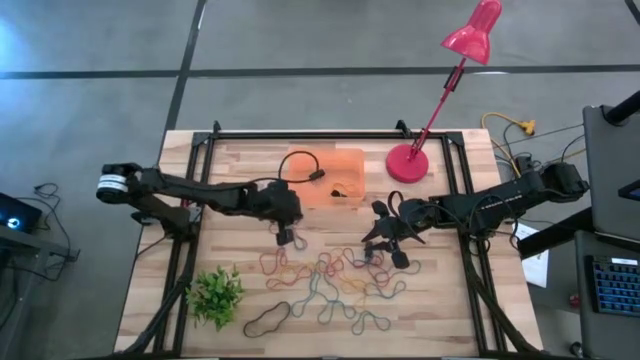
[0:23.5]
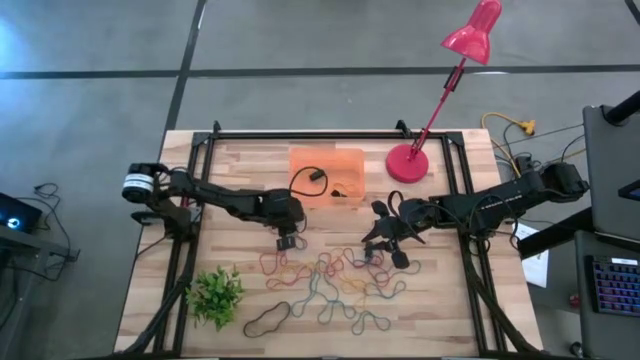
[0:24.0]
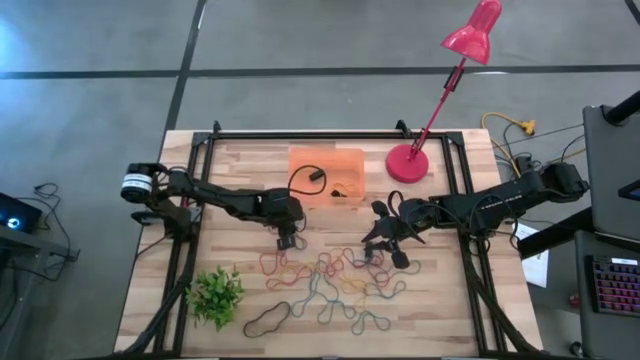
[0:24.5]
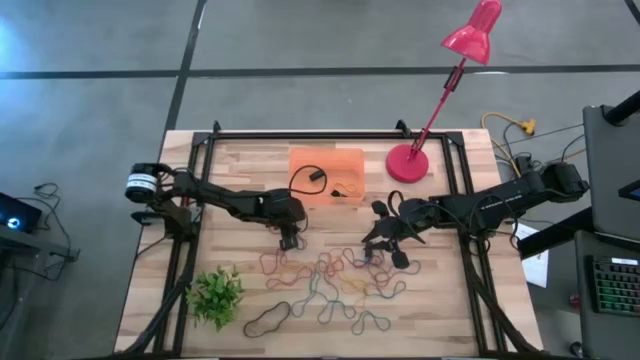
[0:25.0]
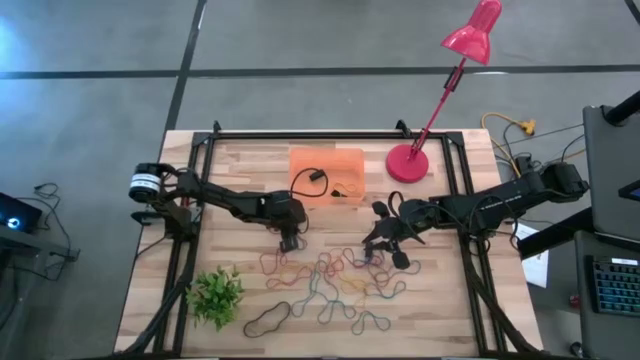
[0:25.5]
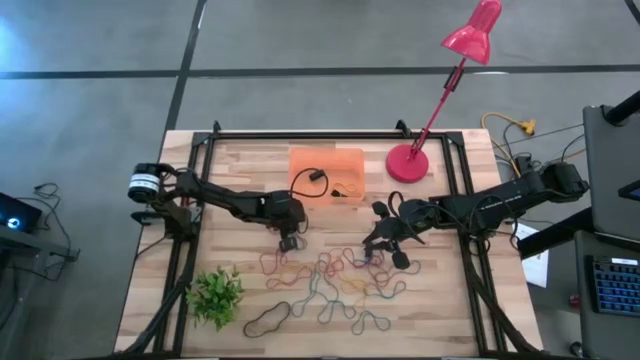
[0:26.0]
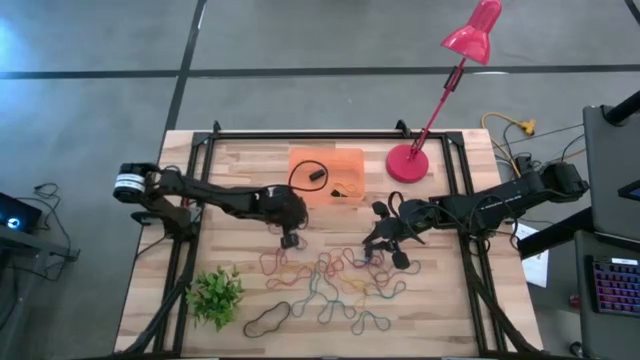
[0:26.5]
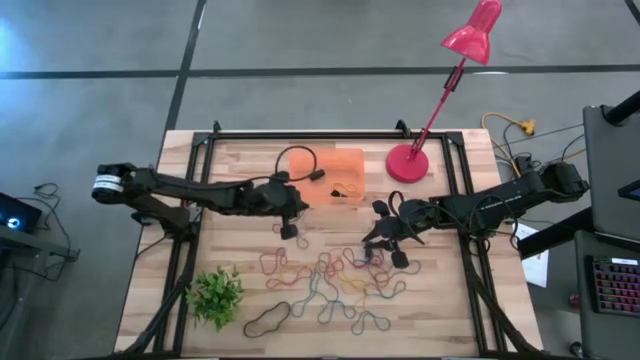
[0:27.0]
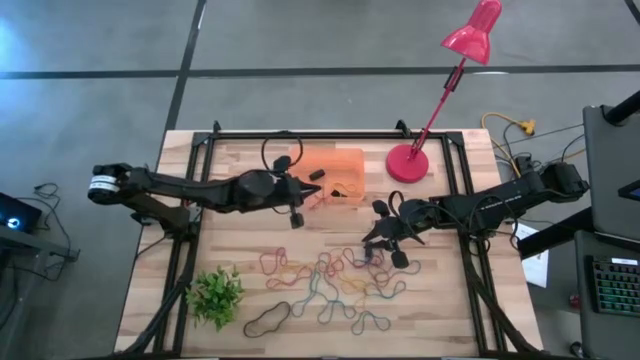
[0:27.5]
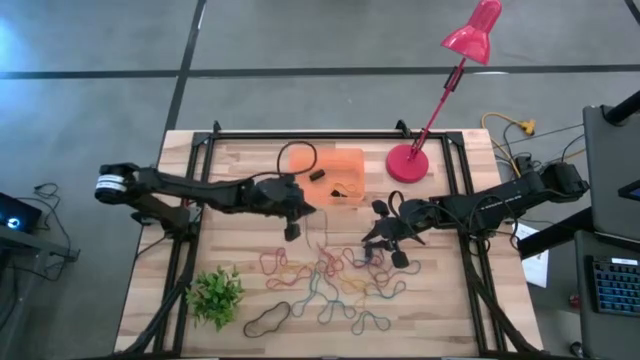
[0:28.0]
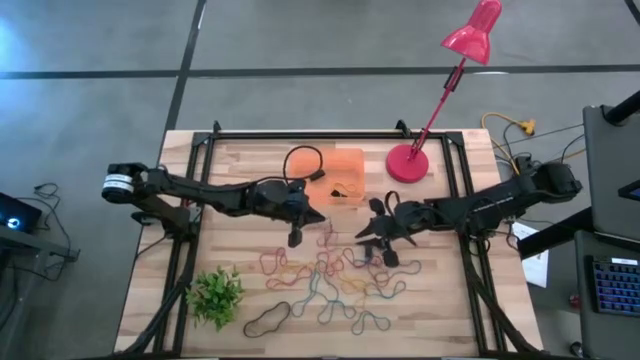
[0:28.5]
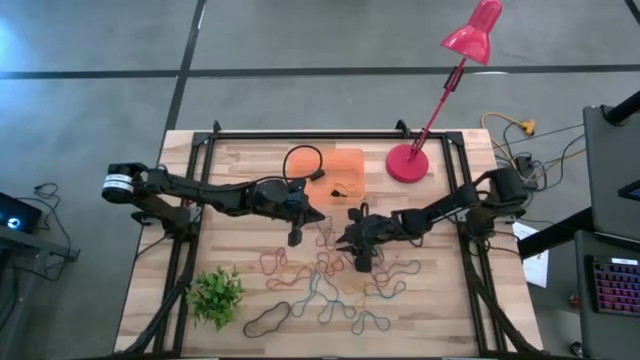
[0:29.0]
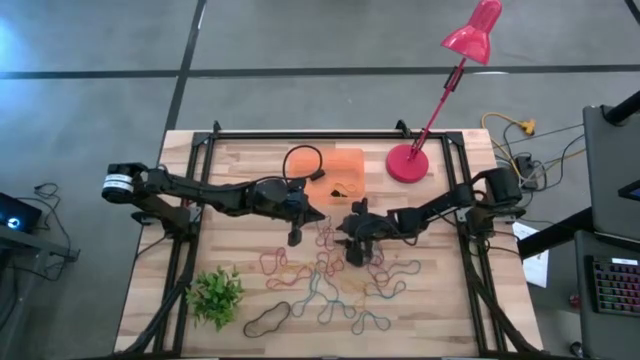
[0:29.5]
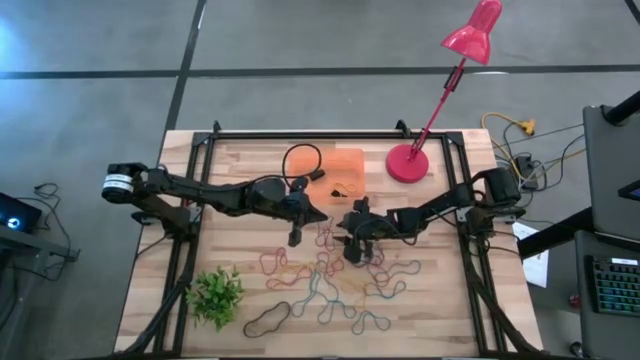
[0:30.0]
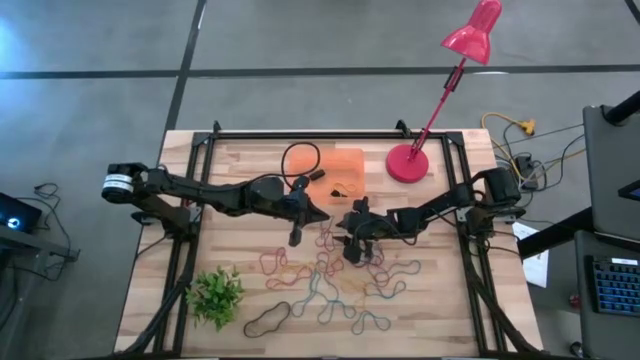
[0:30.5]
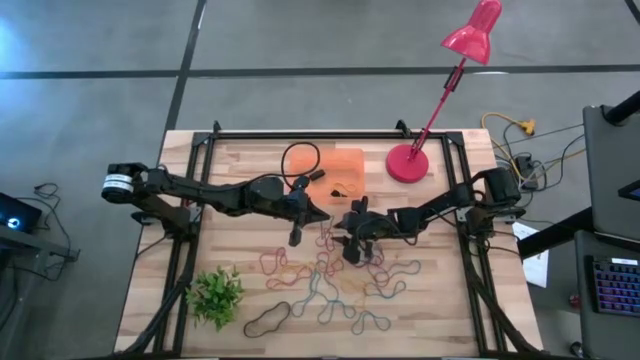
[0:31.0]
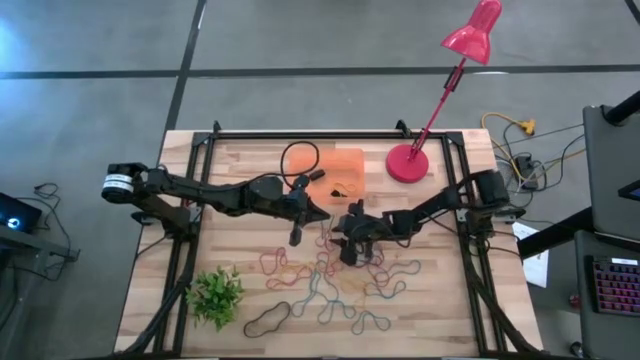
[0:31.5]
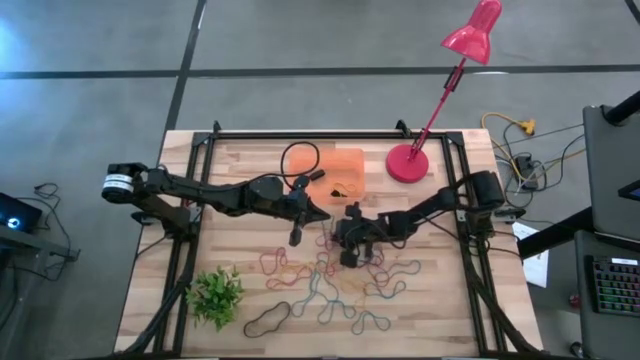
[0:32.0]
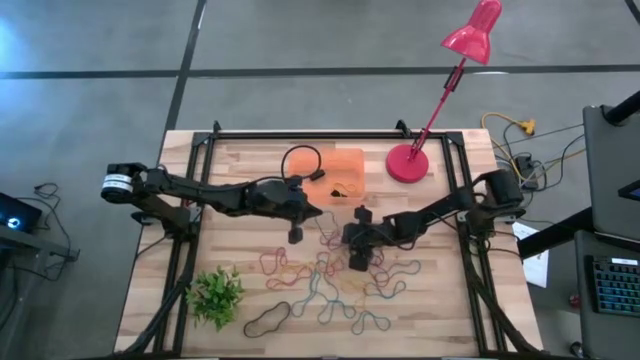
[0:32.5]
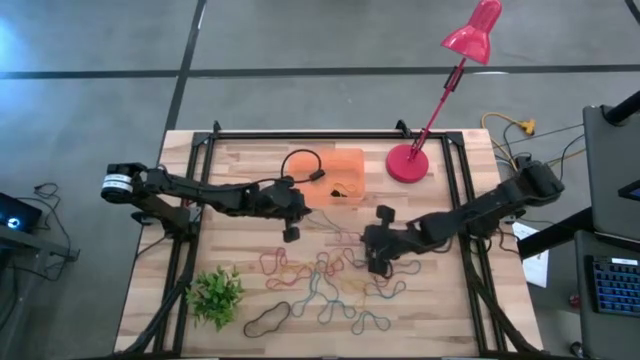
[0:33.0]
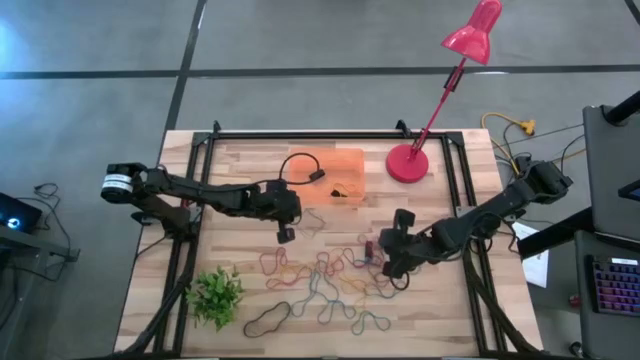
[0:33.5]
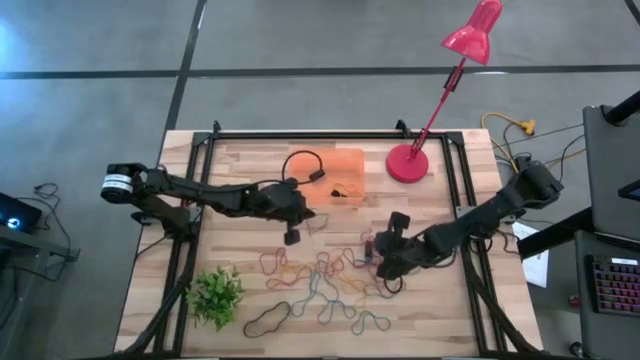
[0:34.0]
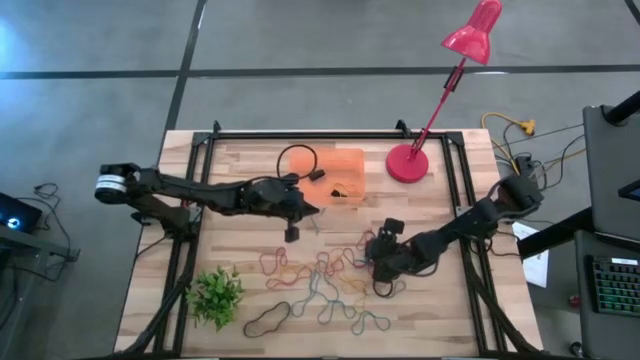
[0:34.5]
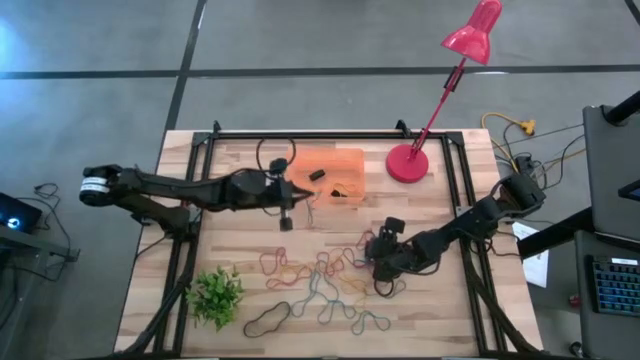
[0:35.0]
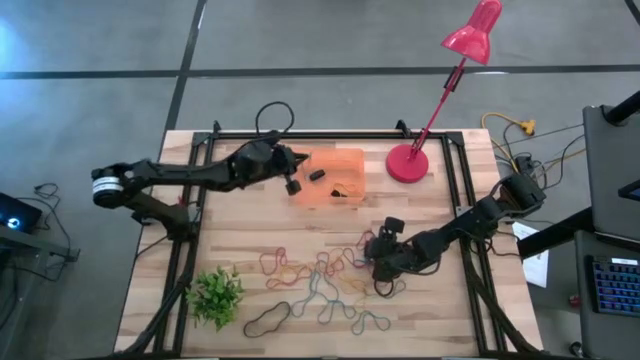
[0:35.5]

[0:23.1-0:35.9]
Task: Pick and place rubber bands into bin
Put the blue rubber band into the orange bin

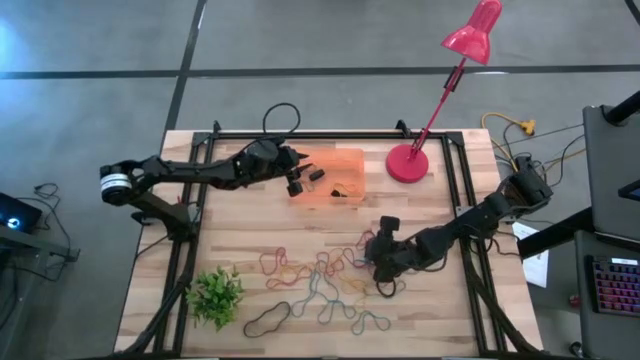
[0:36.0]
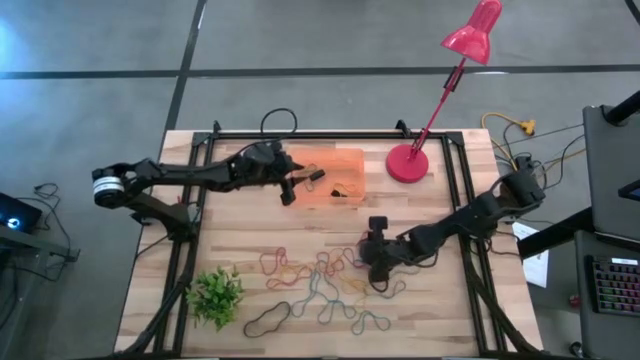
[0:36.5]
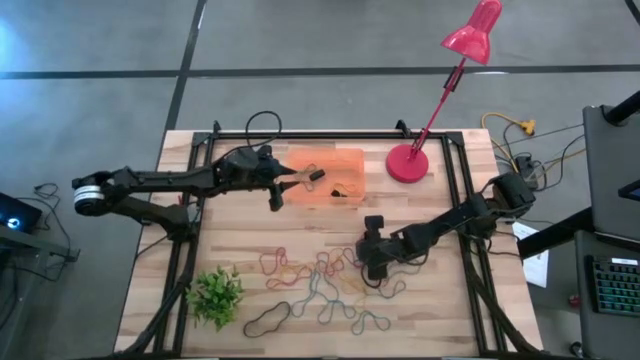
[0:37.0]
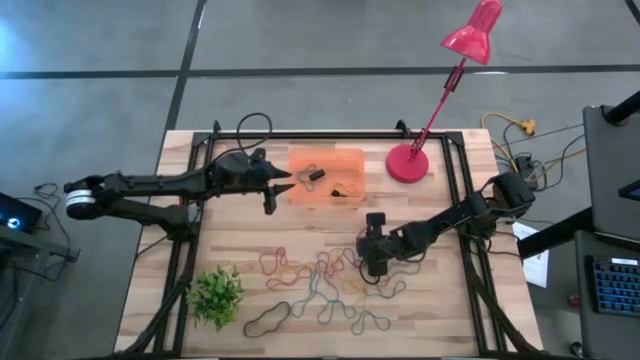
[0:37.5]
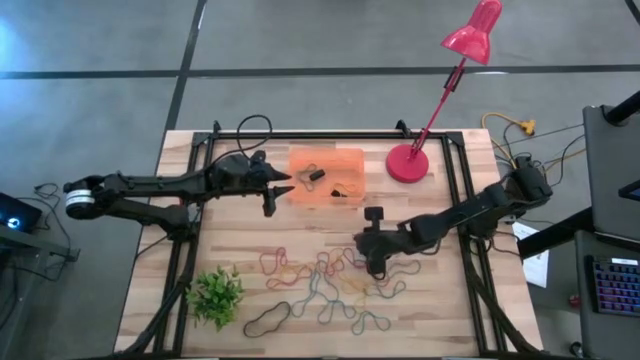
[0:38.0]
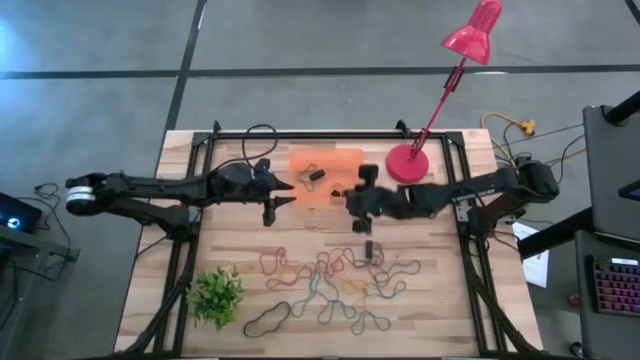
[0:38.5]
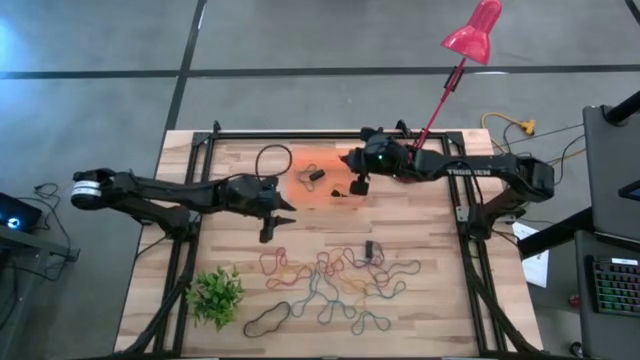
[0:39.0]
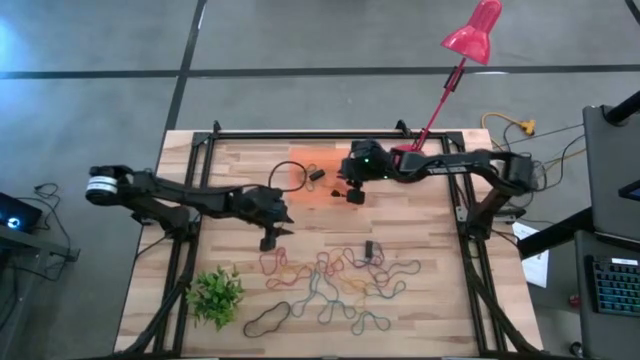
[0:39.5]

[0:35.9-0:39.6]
Put the red rubber band into the orange bin

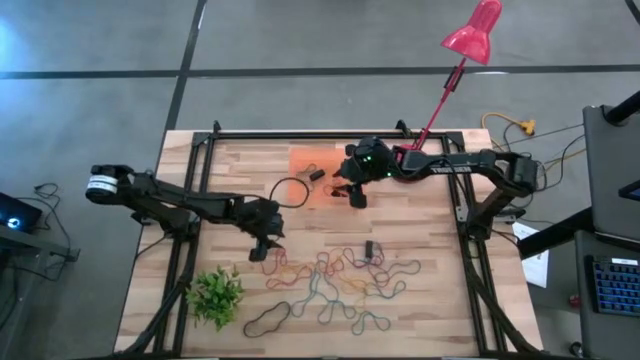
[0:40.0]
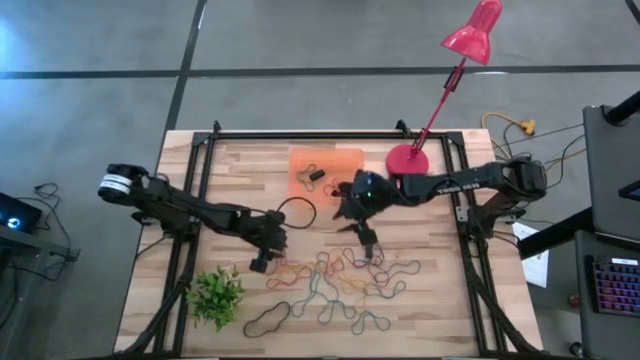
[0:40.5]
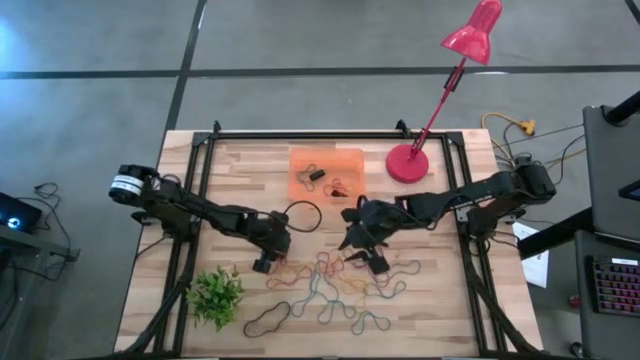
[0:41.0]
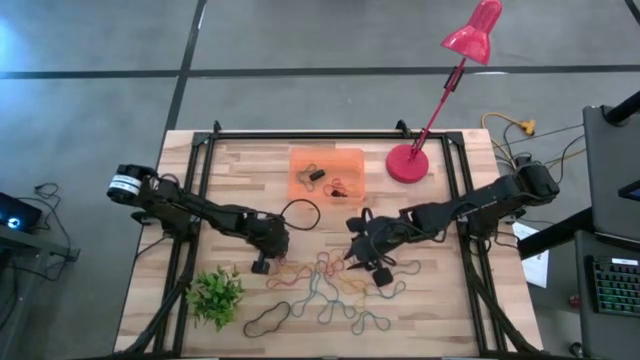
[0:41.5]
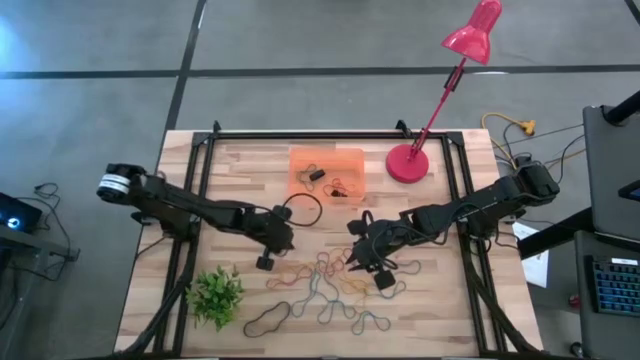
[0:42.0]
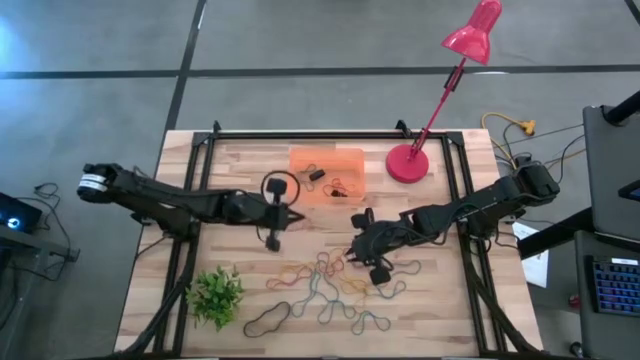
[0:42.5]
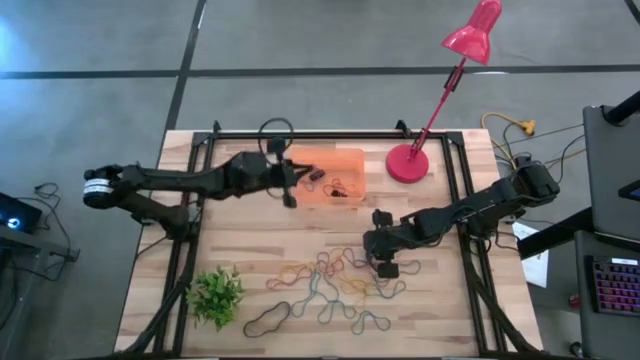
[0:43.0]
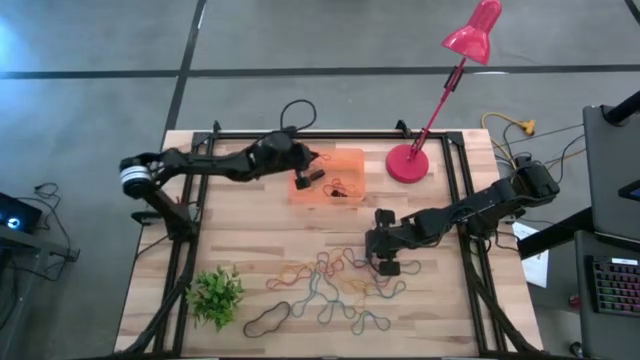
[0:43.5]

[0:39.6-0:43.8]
Put the red rubber band into the orange bin
